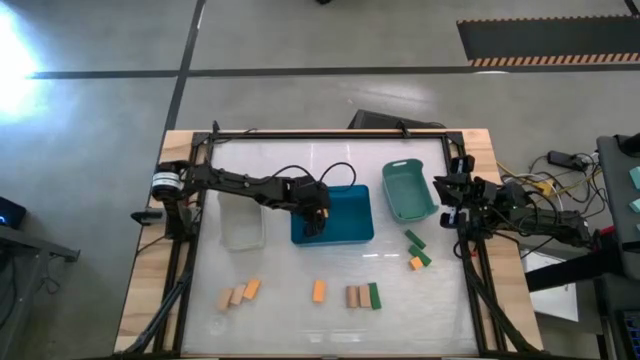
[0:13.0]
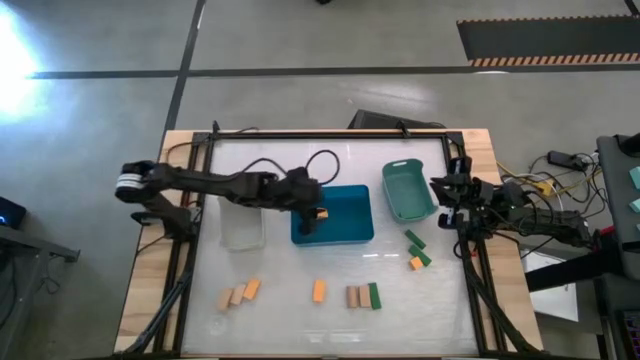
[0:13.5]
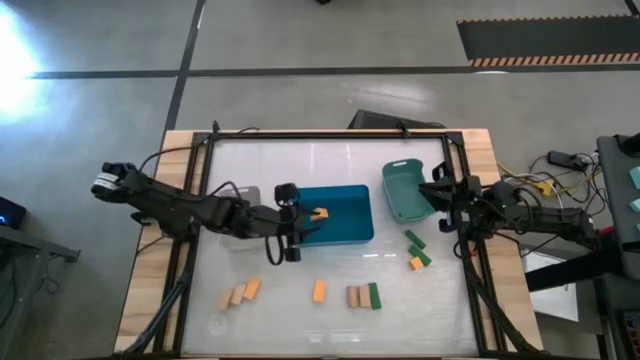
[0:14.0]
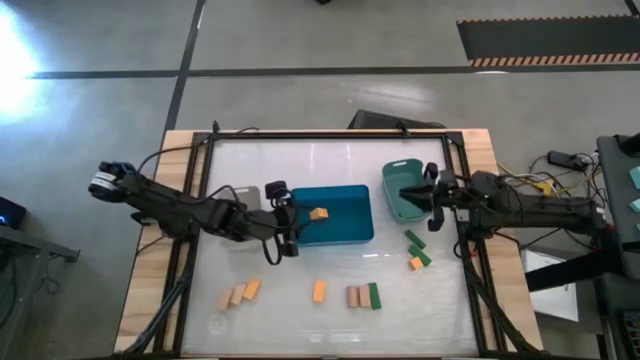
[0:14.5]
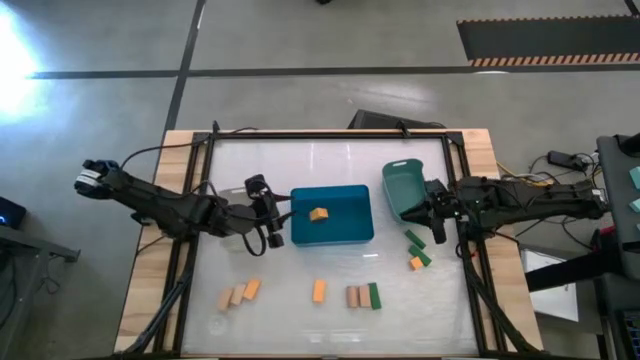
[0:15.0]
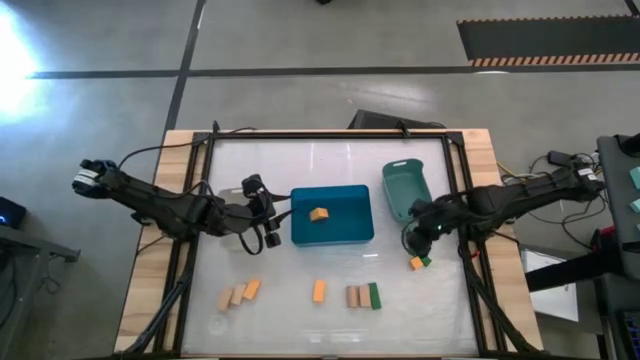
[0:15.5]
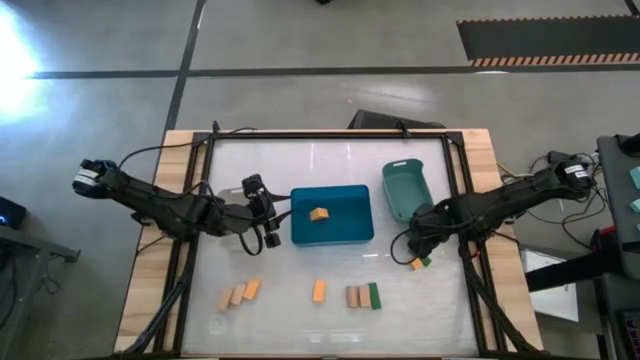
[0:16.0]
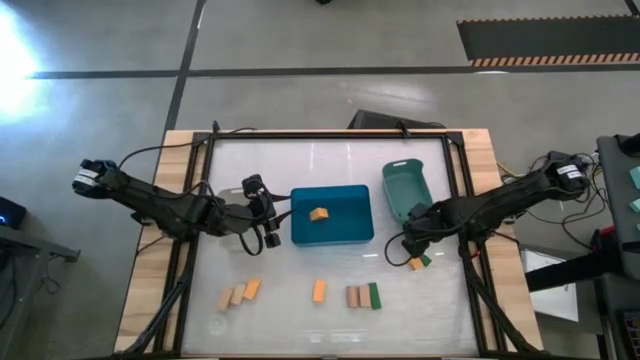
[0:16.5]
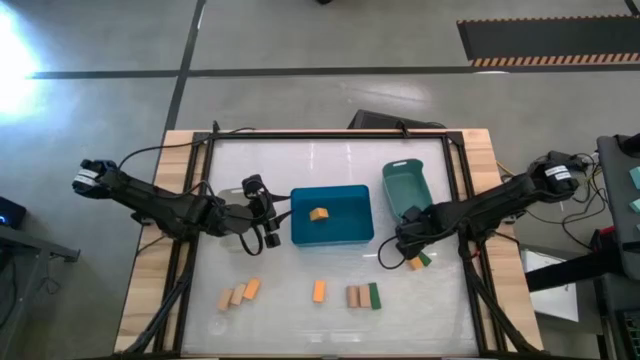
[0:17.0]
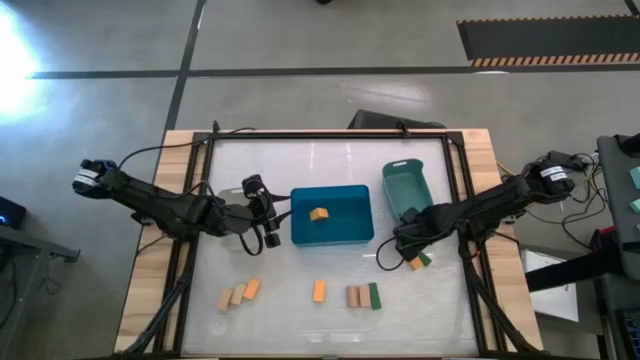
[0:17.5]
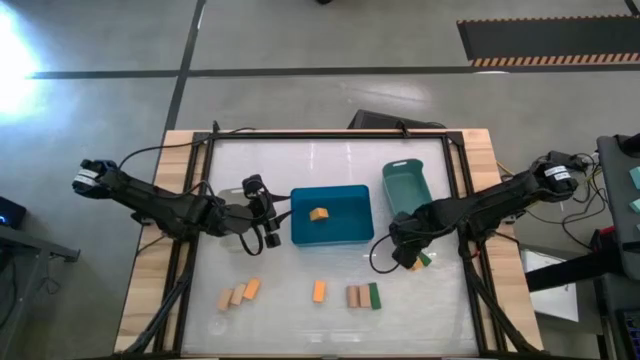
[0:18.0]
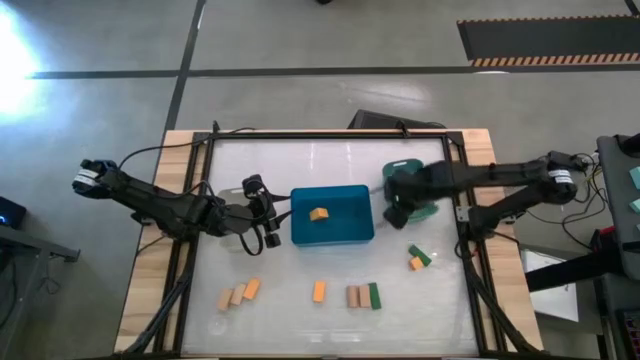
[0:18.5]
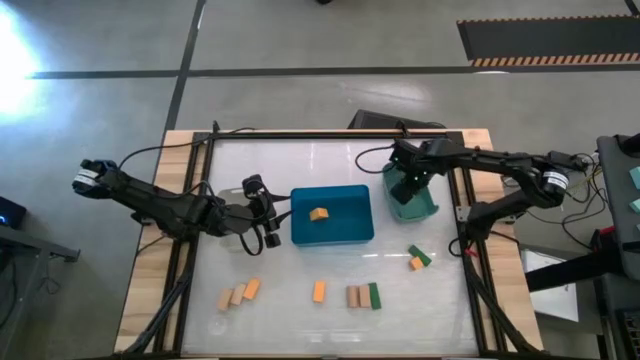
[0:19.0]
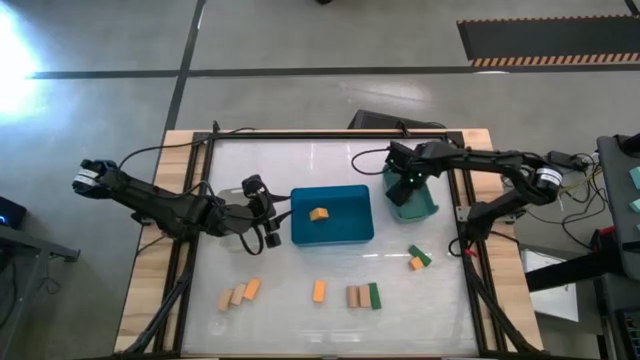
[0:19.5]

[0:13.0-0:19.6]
Task: Sort & place blocks by color
Put the green block into the teal bin

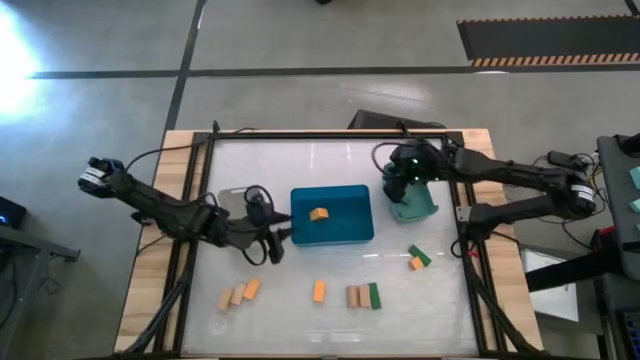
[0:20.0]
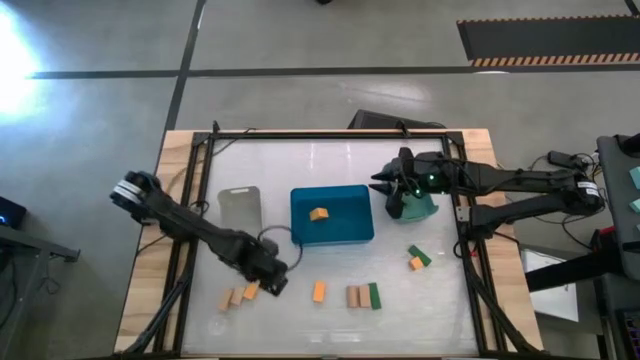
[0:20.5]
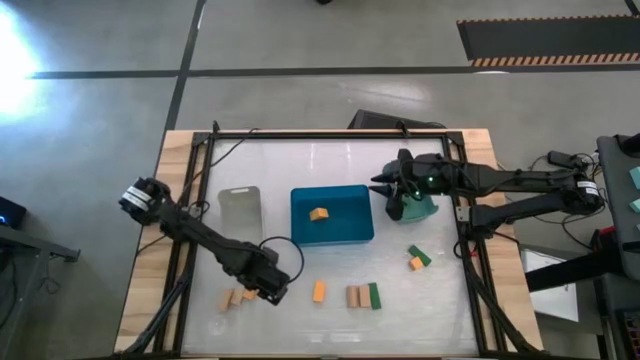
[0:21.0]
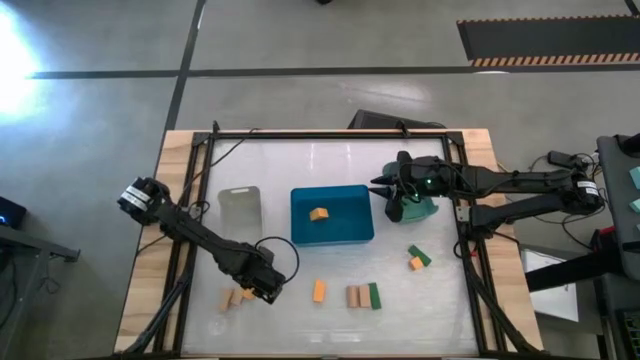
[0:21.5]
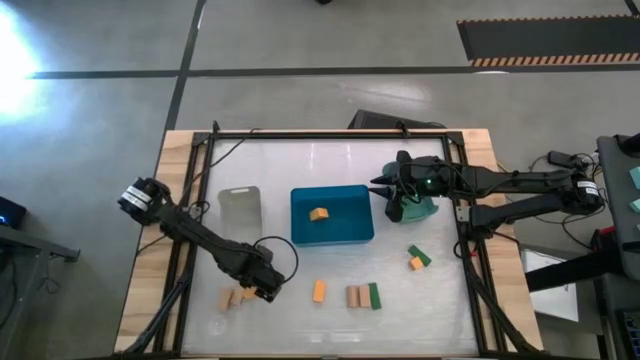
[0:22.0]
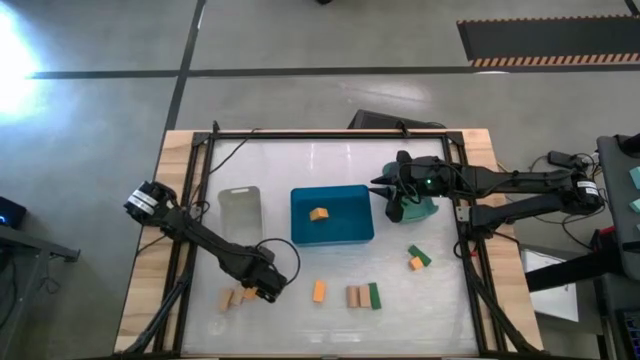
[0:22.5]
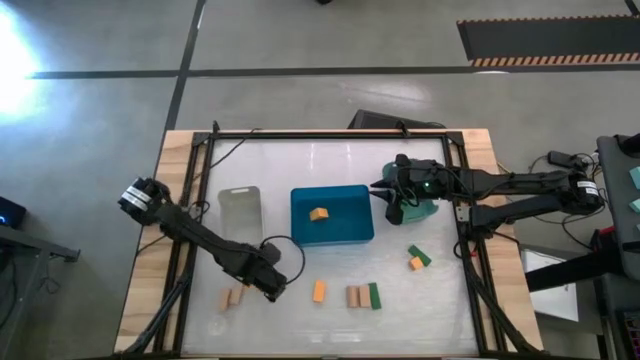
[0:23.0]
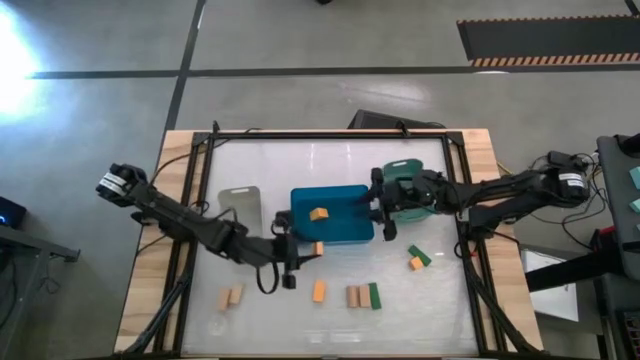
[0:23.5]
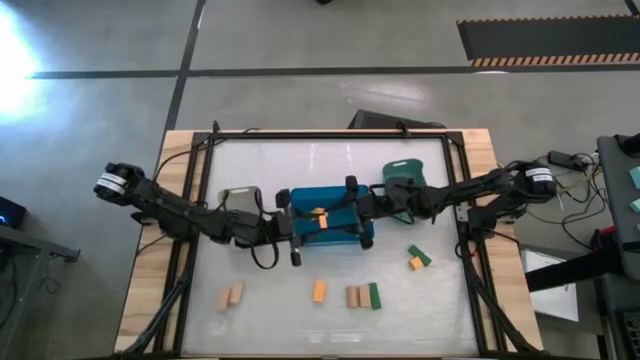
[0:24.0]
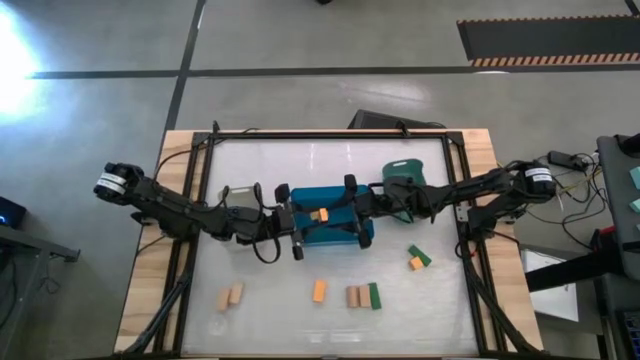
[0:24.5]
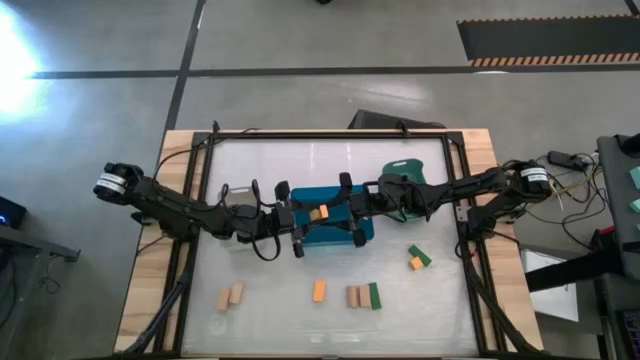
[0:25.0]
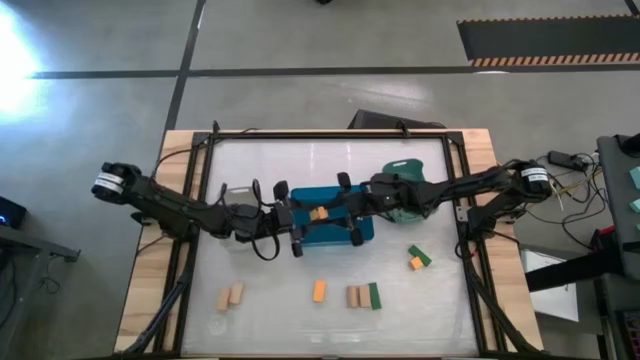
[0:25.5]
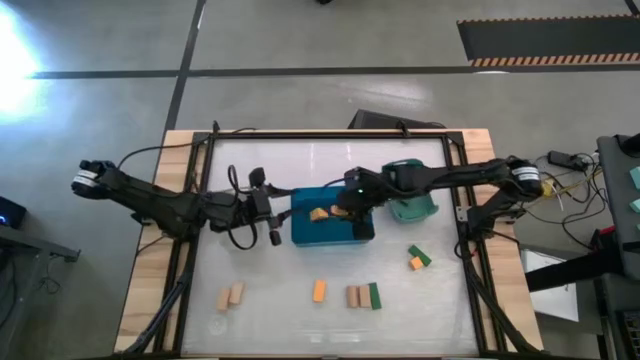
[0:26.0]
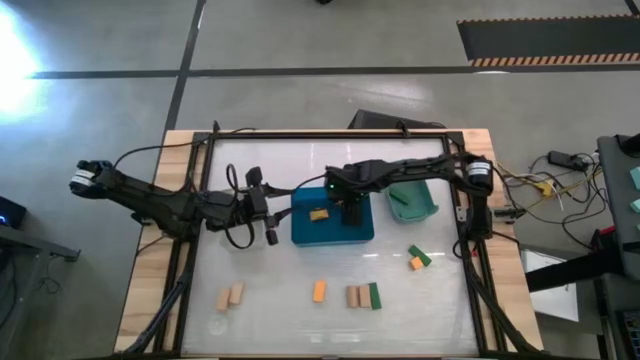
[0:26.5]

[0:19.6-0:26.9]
Put the yellow block into the blue bin

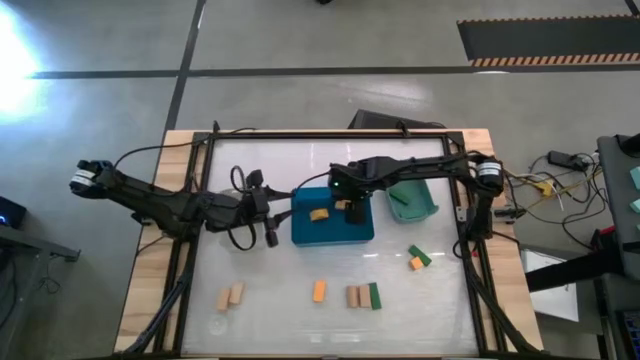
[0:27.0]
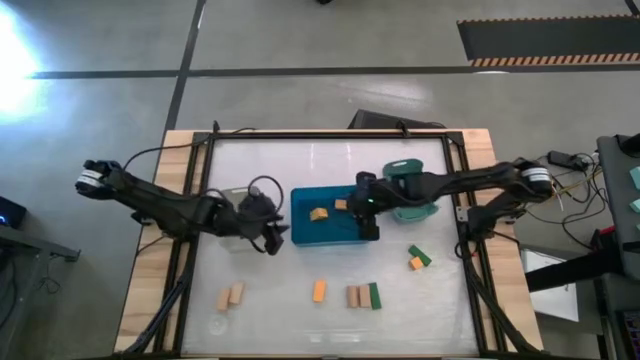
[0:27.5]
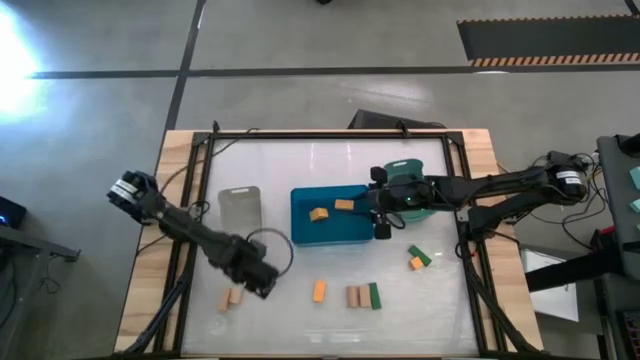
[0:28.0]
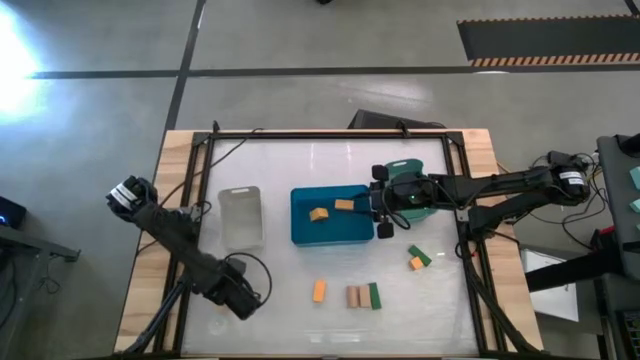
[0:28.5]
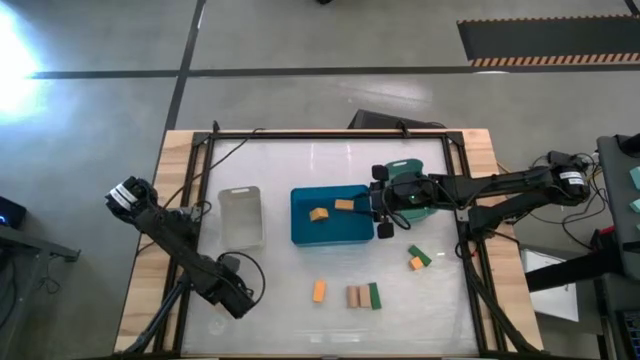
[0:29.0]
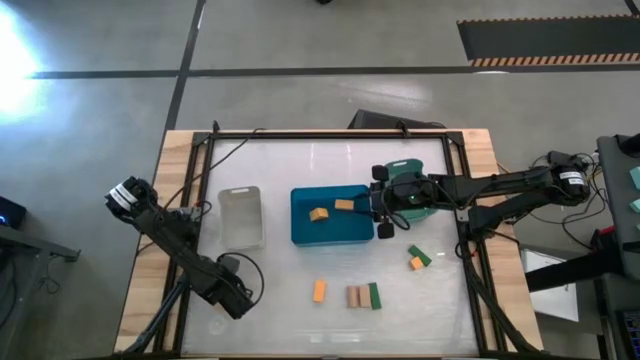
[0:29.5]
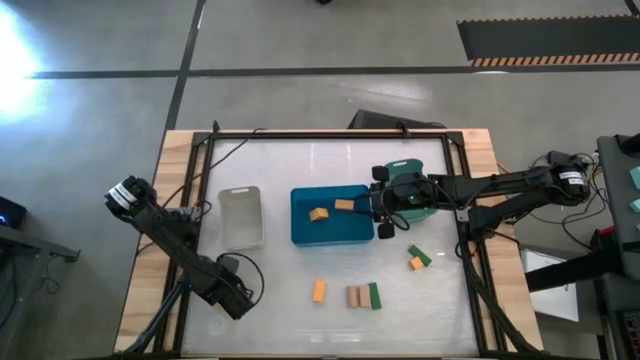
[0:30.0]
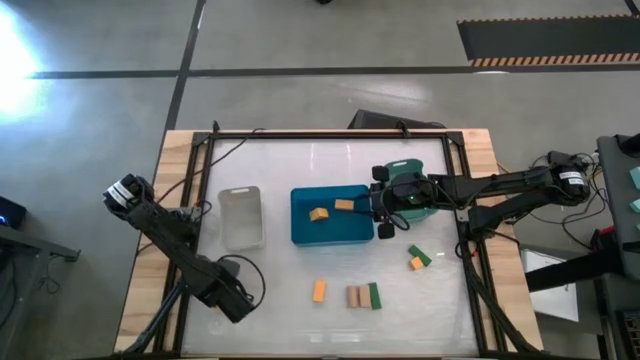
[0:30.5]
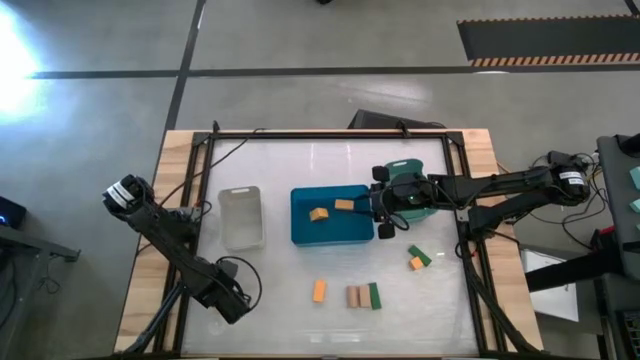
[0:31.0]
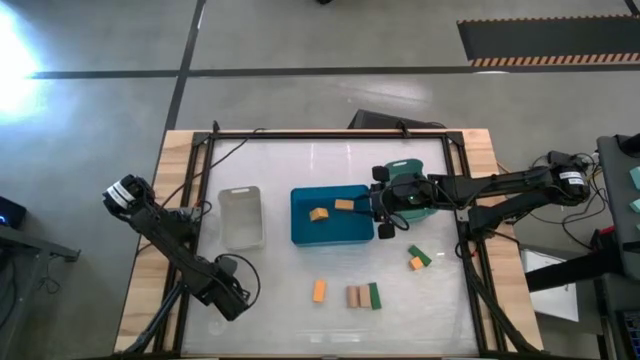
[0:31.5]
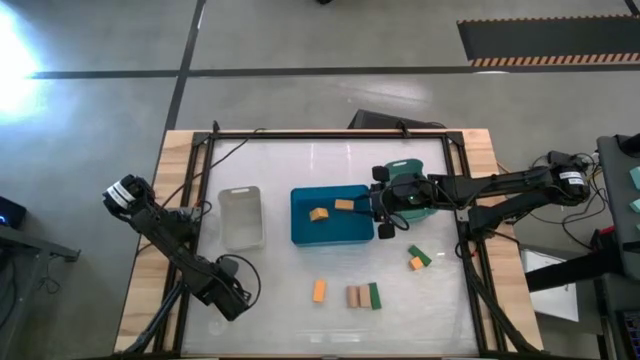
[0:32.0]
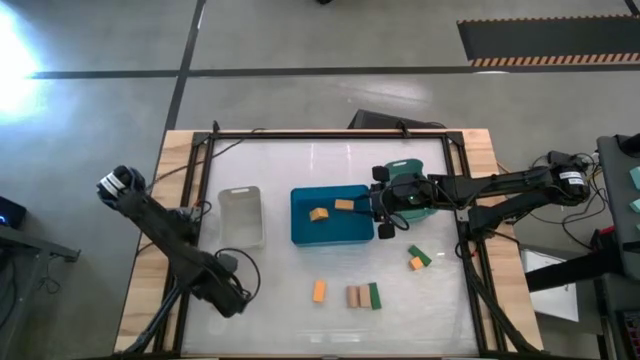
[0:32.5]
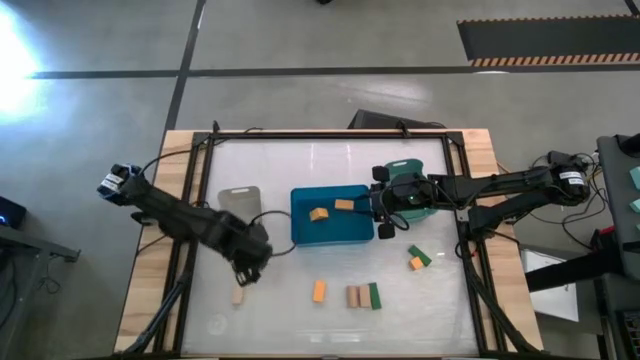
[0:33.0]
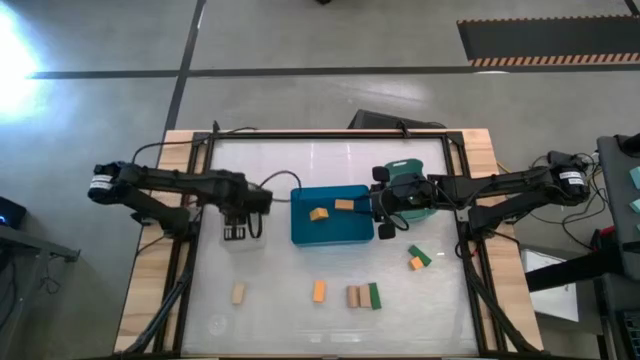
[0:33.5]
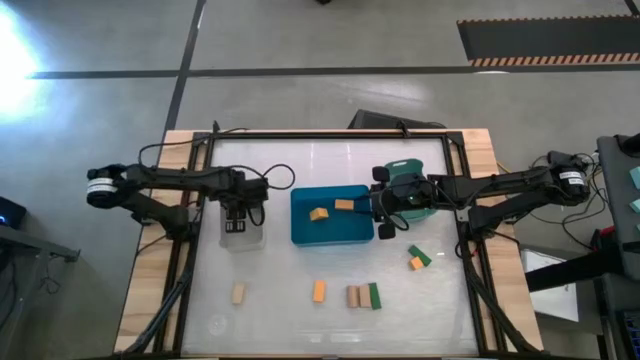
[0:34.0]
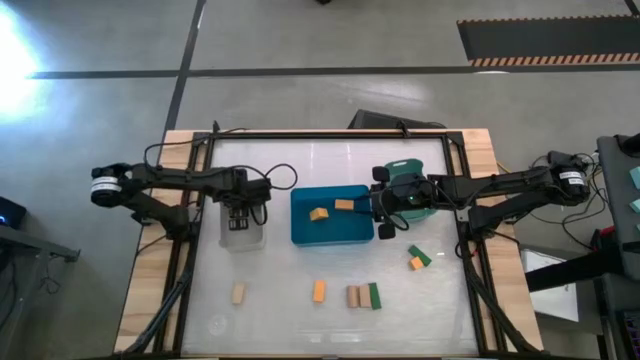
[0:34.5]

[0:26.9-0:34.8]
Put the brown block into the gray bin
